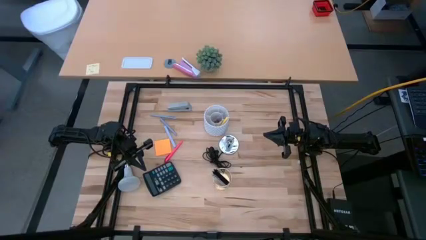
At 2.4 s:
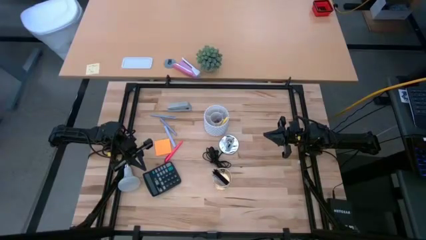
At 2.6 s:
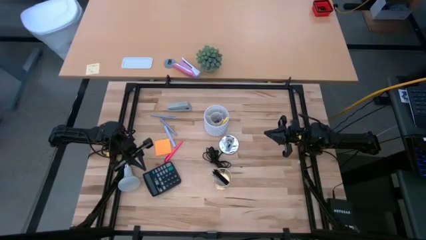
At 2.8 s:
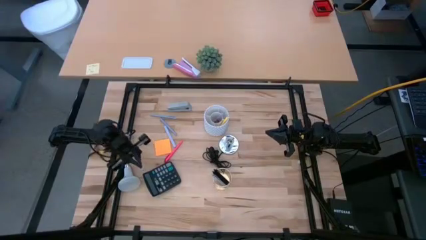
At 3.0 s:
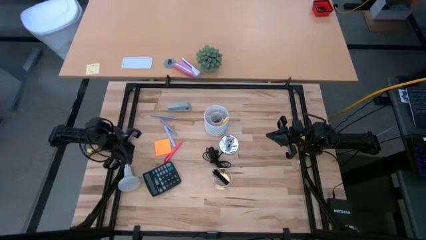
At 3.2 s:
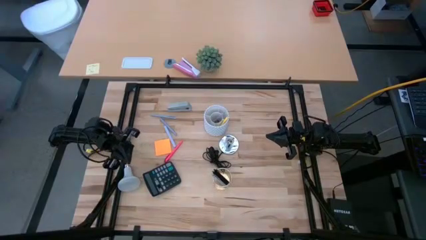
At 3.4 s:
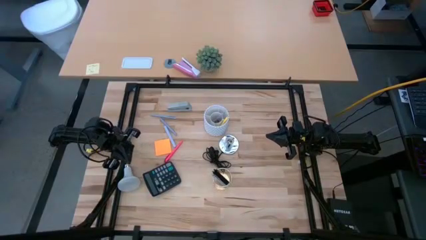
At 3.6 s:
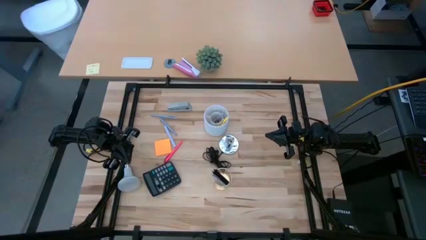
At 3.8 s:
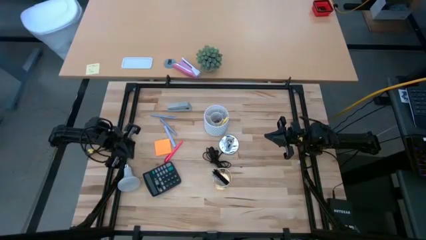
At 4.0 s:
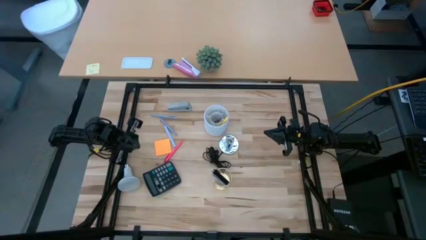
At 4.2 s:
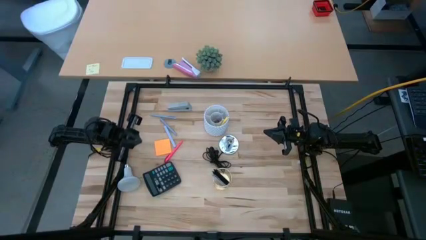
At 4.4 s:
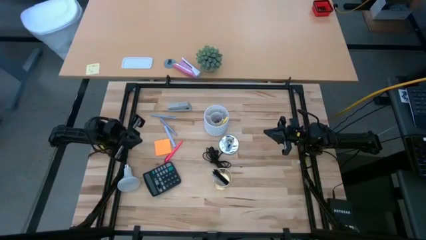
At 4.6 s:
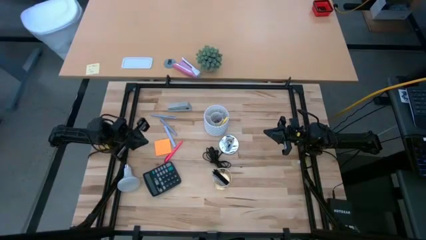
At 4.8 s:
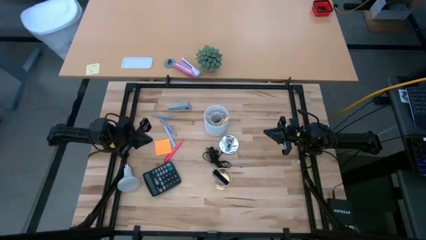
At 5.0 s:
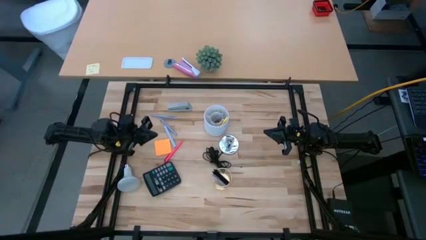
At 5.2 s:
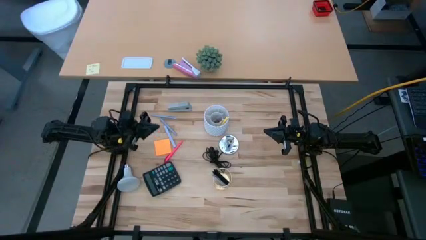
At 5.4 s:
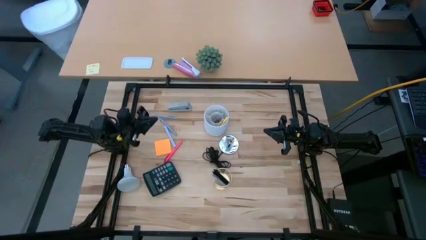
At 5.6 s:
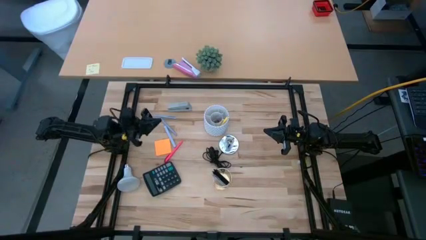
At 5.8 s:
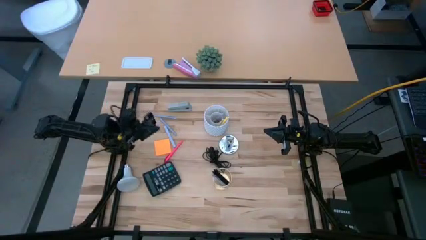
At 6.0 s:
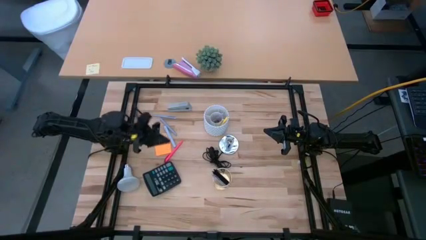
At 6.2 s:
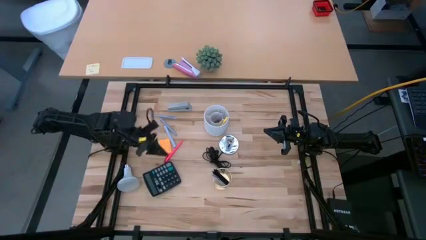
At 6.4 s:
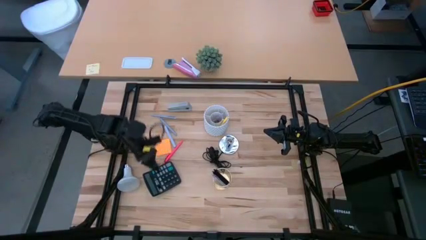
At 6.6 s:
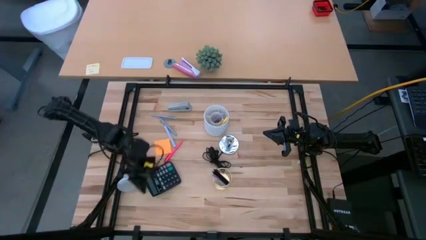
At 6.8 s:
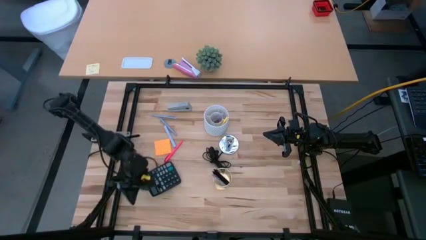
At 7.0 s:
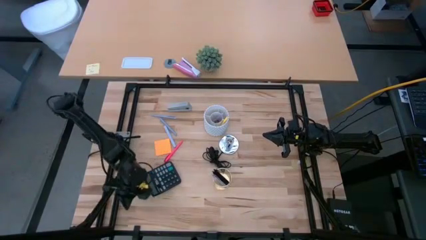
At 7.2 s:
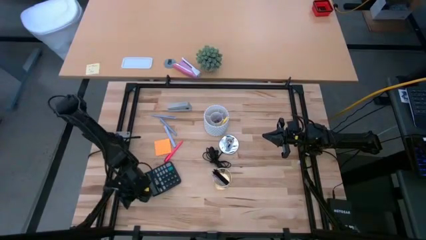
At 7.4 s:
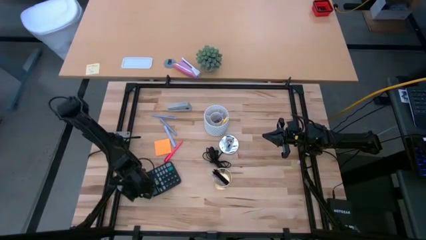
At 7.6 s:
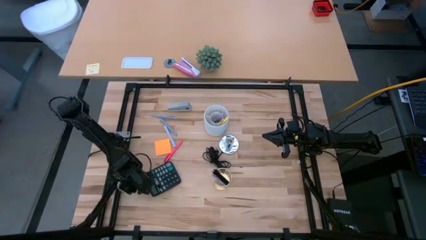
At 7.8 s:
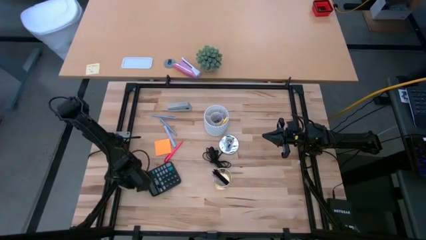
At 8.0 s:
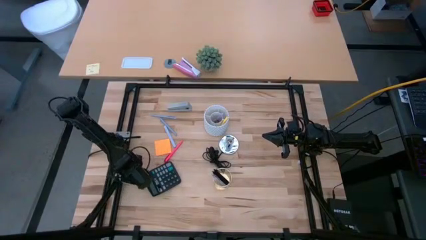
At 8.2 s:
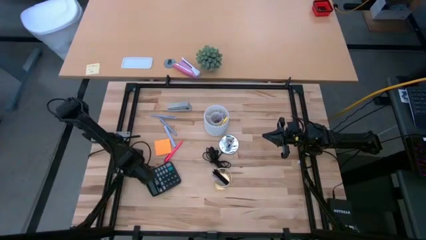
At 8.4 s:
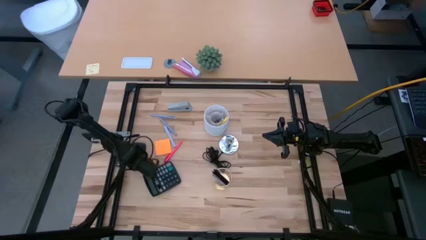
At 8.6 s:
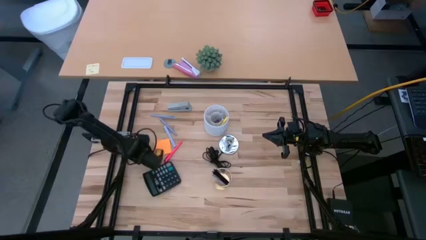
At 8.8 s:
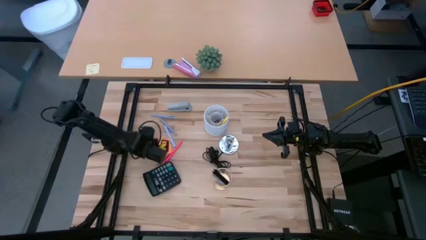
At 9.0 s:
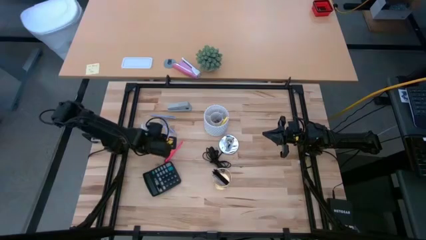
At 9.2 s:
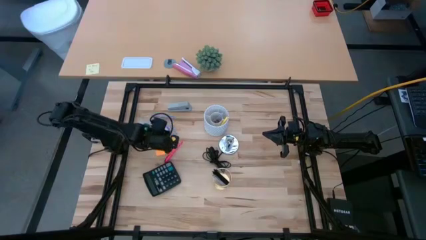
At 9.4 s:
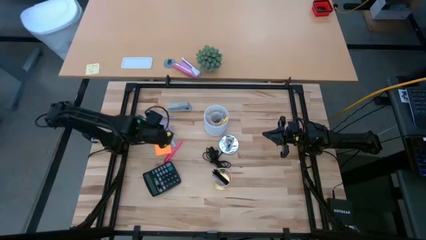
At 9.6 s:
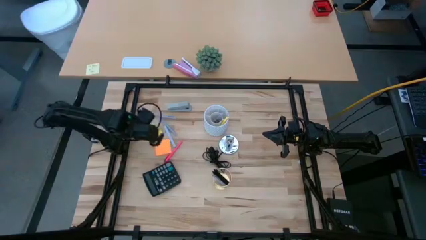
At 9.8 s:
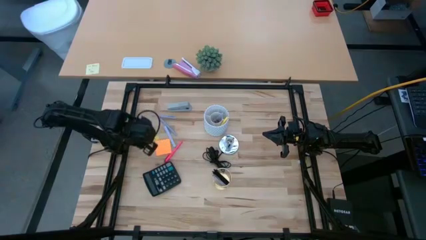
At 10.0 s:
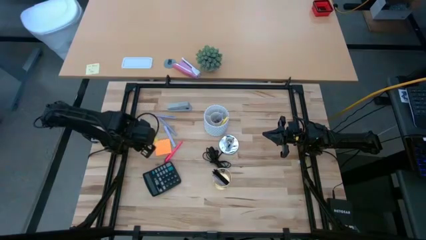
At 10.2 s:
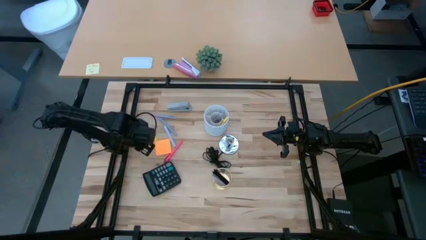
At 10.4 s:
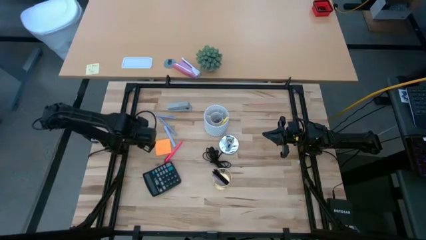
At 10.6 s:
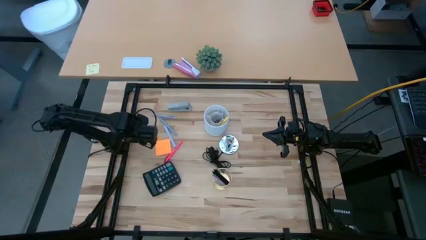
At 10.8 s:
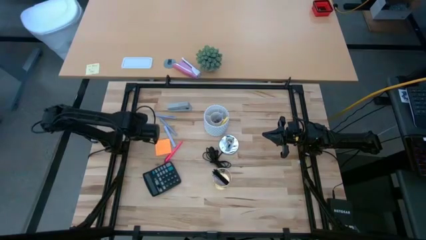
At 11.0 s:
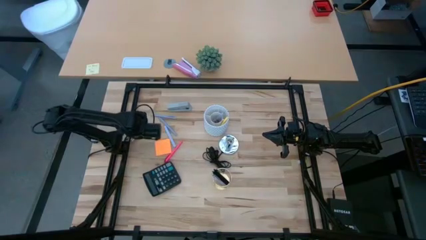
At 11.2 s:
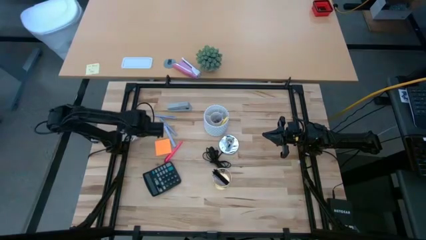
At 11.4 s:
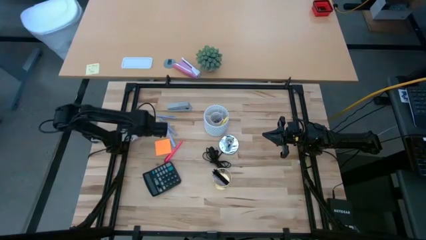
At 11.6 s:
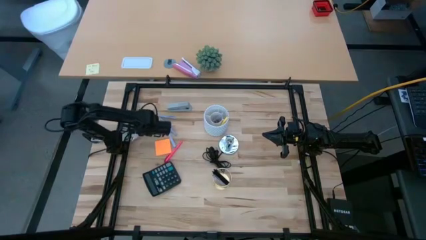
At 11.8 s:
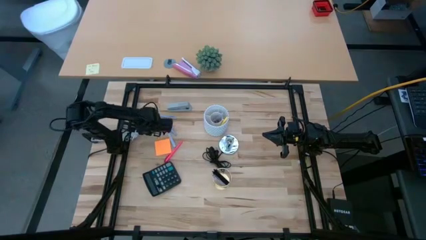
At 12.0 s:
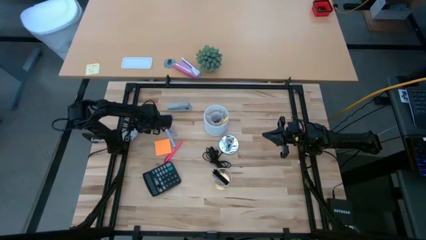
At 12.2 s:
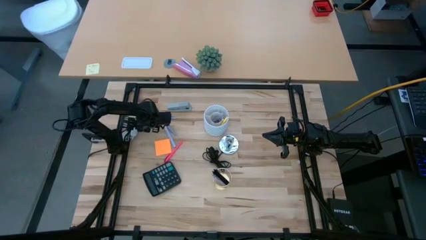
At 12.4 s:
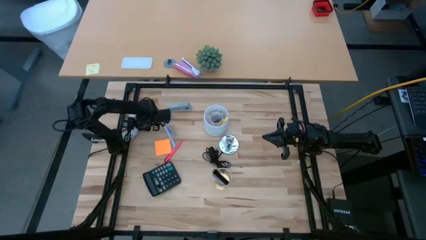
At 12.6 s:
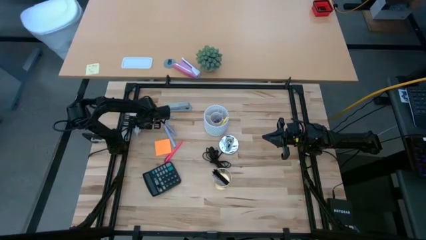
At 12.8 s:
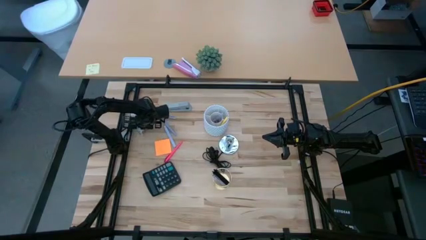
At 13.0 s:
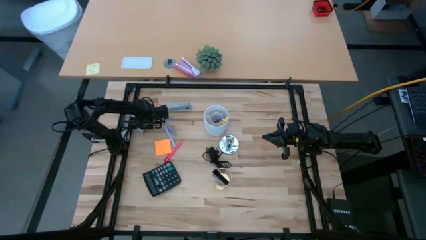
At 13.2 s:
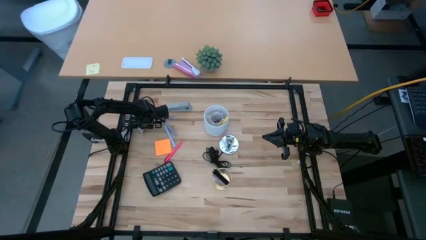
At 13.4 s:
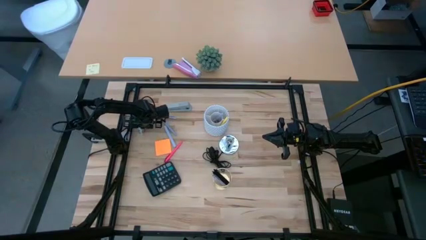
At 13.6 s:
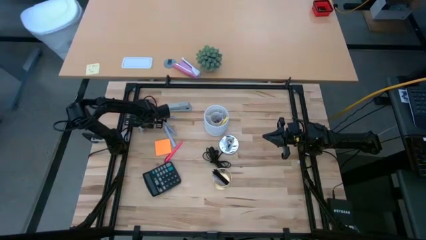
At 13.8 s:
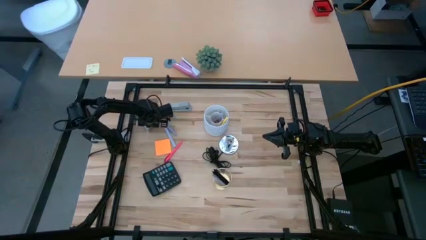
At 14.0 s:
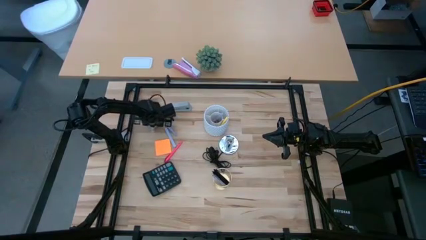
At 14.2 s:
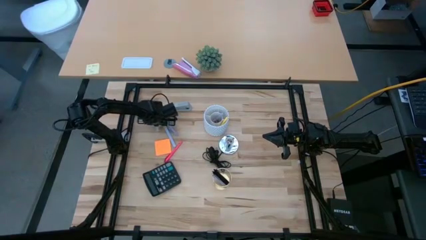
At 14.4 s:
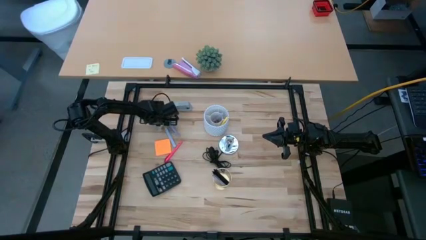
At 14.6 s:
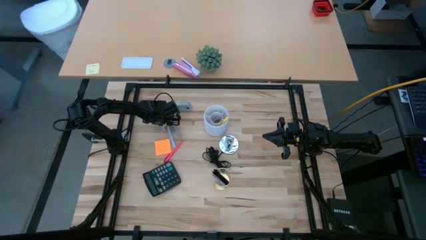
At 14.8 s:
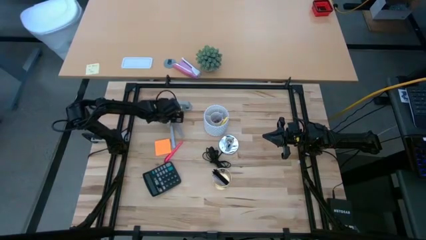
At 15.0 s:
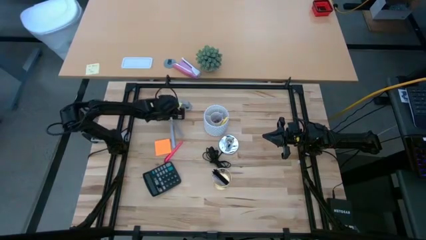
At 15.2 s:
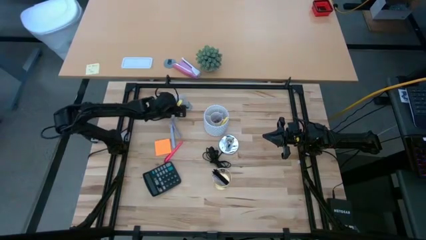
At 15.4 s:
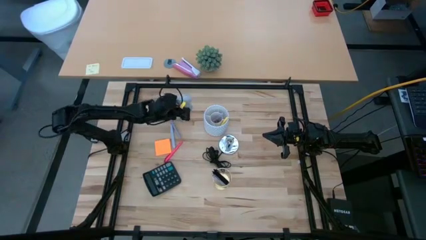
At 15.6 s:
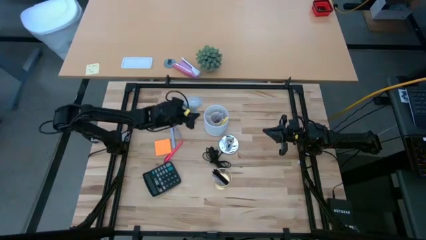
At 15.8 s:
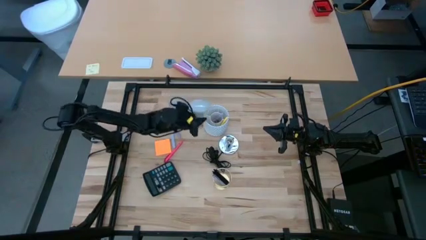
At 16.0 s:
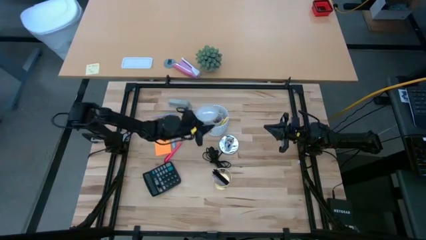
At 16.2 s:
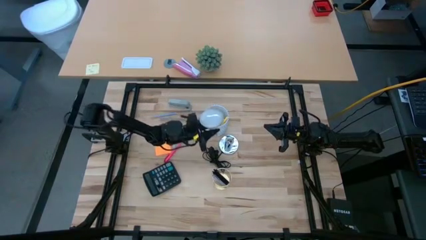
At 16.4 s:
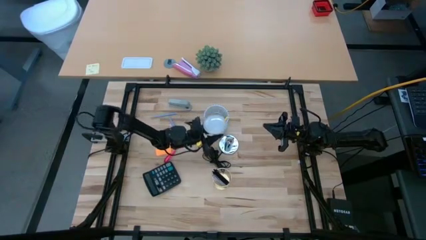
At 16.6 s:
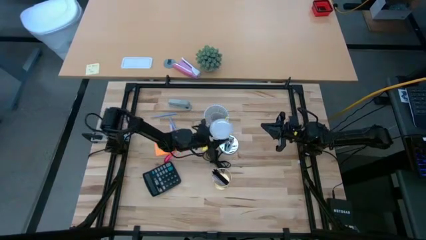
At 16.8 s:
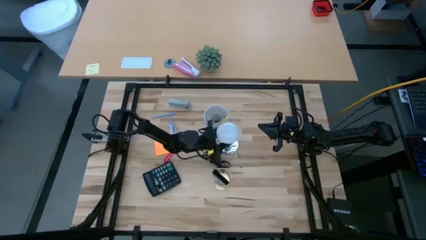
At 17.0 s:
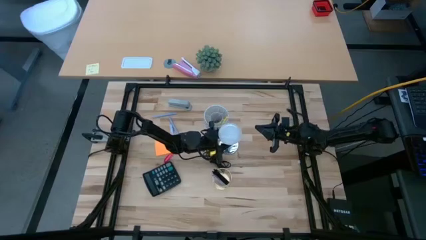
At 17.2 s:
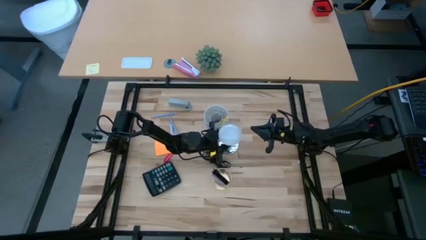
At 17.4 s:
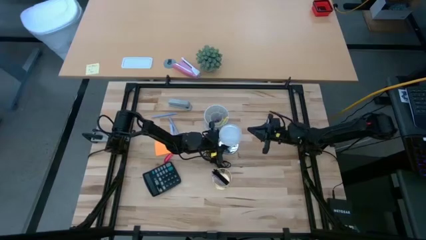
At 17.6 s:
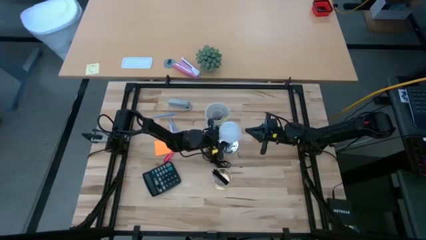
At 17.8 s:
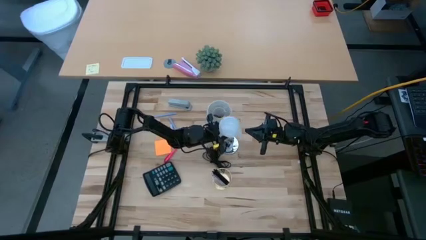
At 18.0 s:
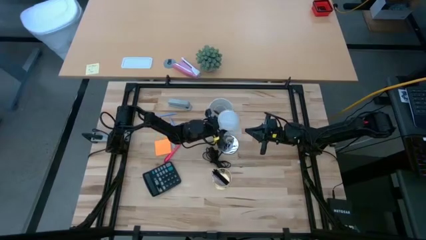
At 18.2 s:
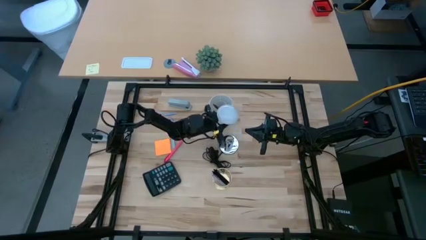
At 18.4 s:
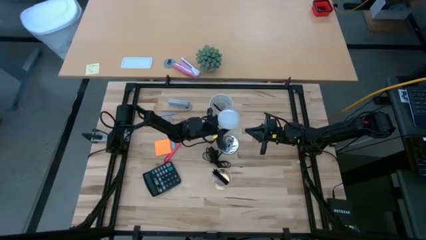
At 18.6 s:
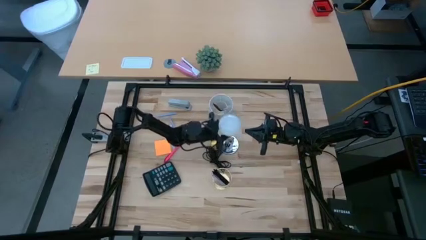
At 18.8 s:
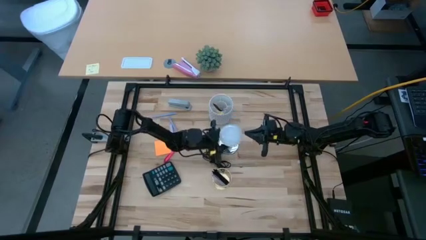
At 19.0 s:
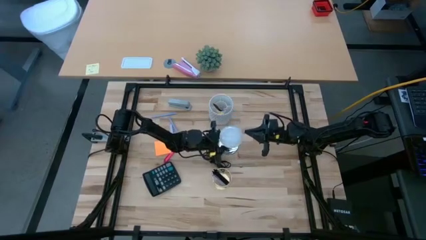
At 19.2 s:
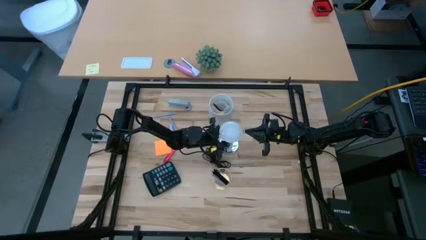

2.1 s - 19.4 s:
Task: Screw lightbulb
Insert the lightbulb into the lamp
